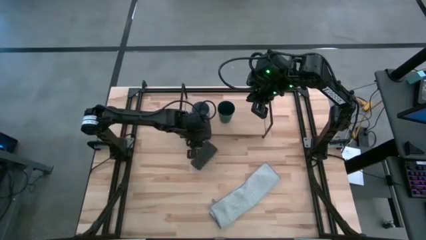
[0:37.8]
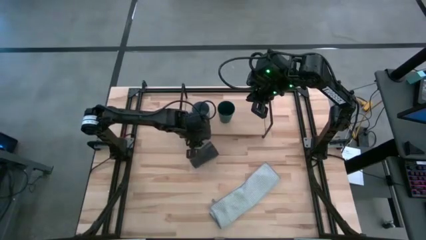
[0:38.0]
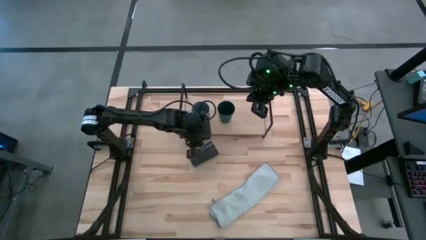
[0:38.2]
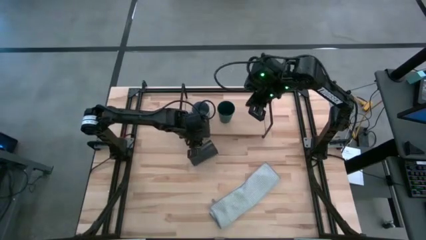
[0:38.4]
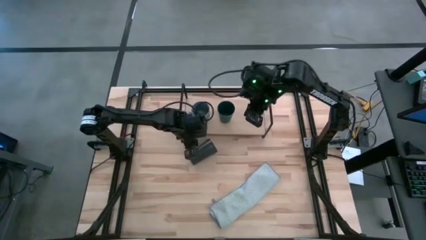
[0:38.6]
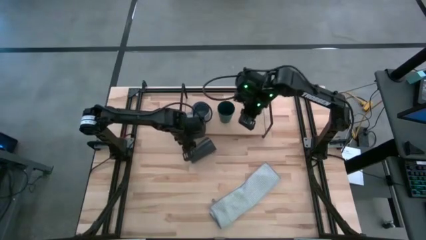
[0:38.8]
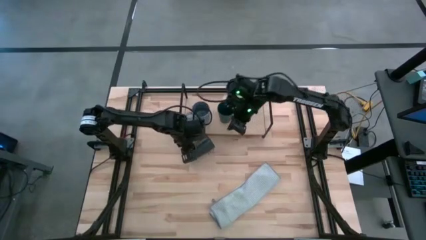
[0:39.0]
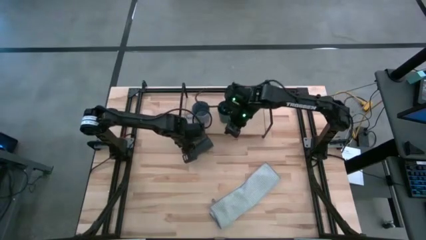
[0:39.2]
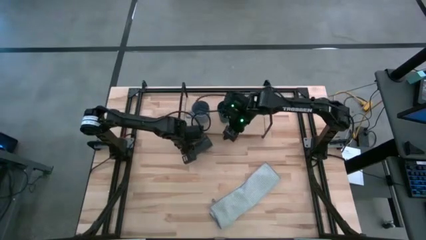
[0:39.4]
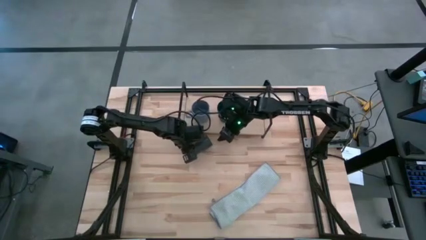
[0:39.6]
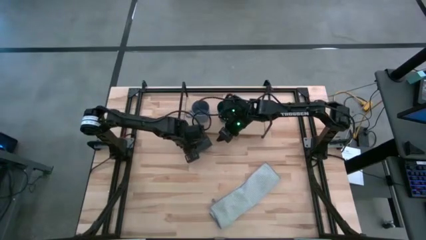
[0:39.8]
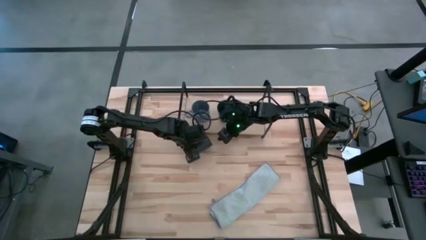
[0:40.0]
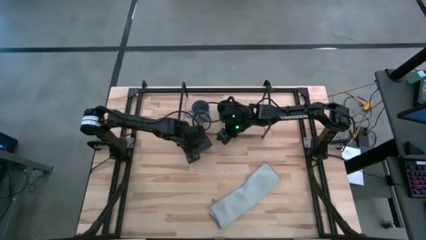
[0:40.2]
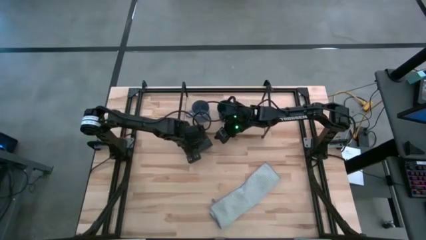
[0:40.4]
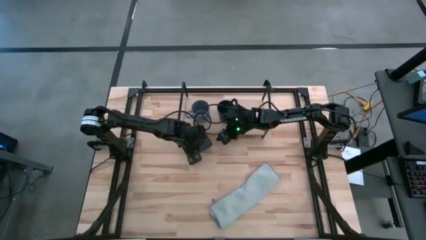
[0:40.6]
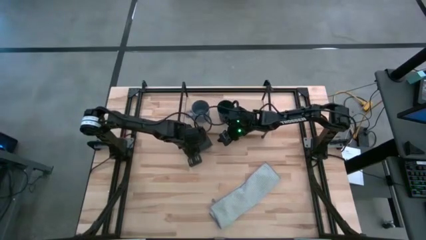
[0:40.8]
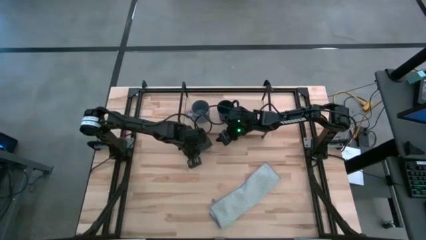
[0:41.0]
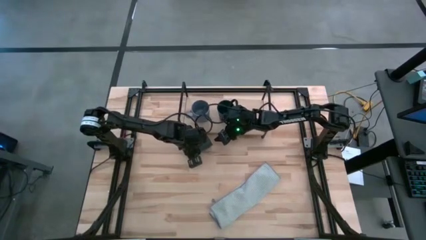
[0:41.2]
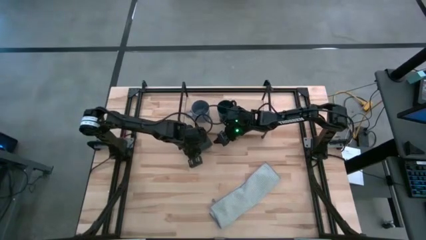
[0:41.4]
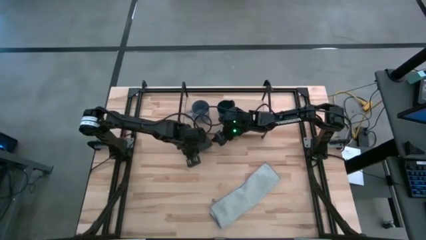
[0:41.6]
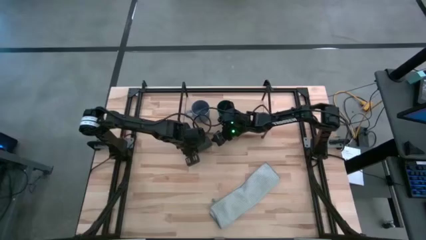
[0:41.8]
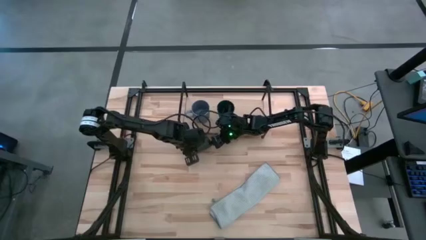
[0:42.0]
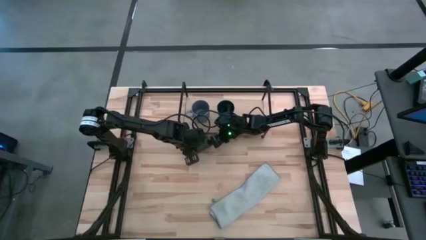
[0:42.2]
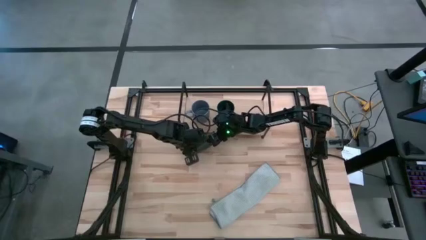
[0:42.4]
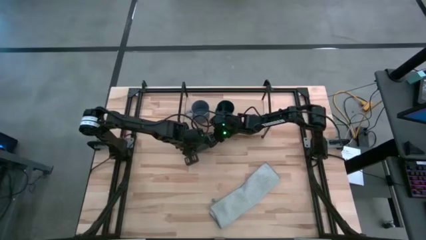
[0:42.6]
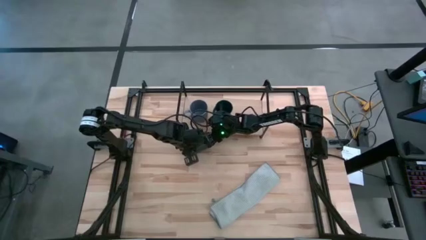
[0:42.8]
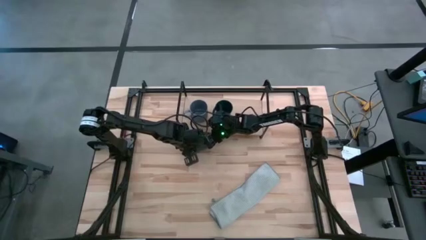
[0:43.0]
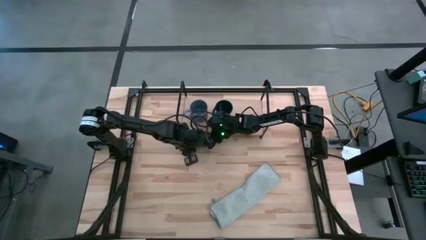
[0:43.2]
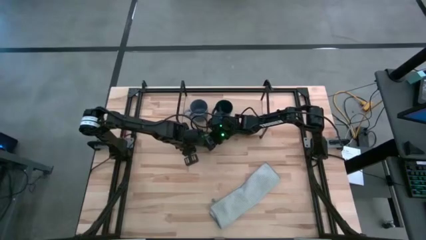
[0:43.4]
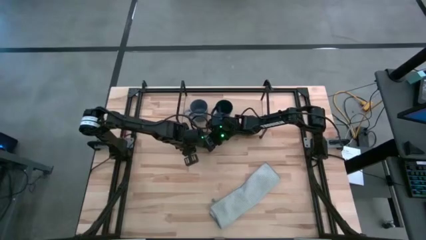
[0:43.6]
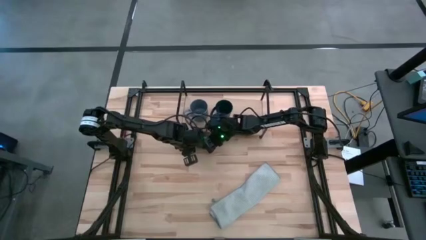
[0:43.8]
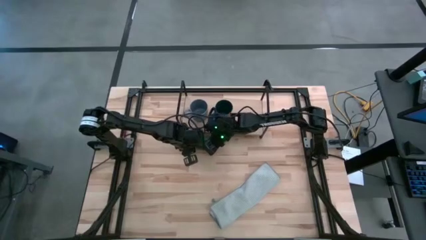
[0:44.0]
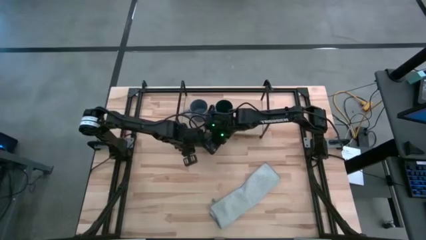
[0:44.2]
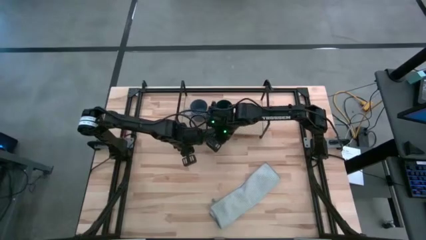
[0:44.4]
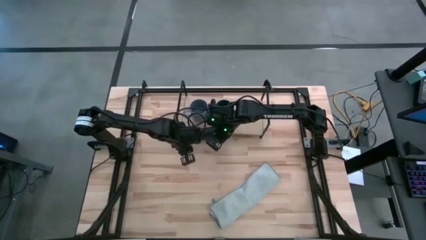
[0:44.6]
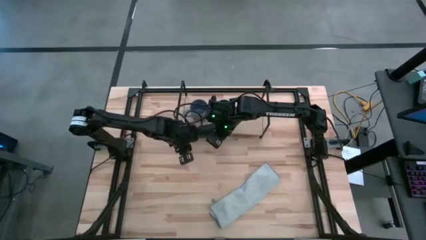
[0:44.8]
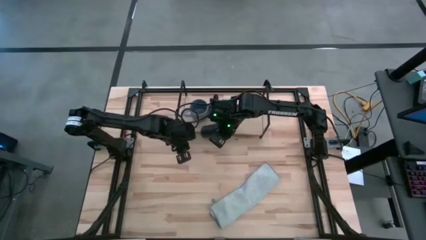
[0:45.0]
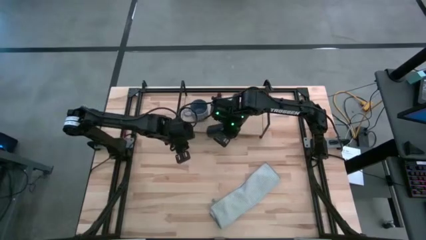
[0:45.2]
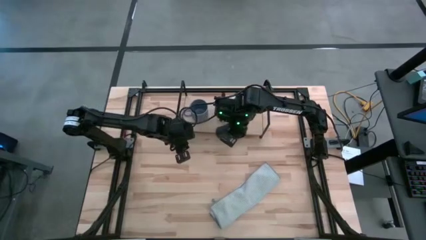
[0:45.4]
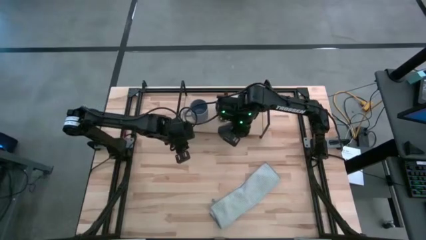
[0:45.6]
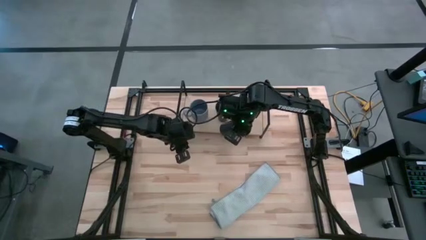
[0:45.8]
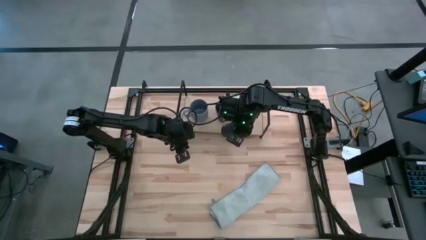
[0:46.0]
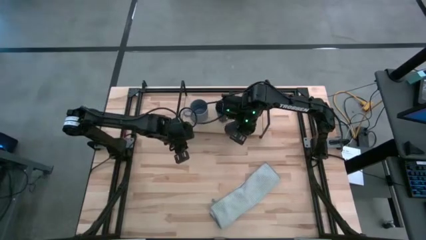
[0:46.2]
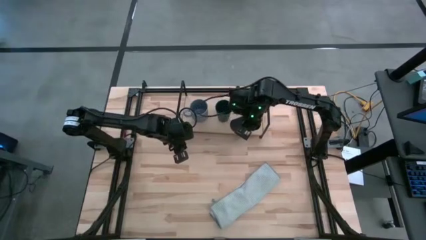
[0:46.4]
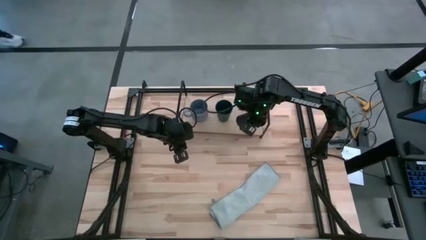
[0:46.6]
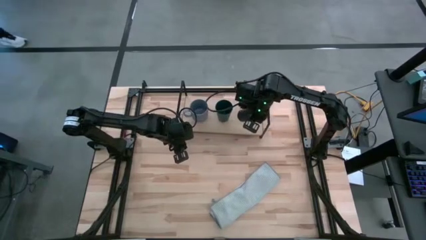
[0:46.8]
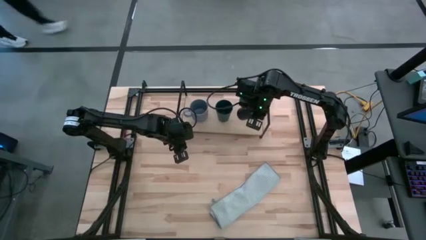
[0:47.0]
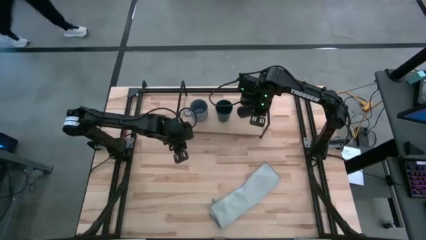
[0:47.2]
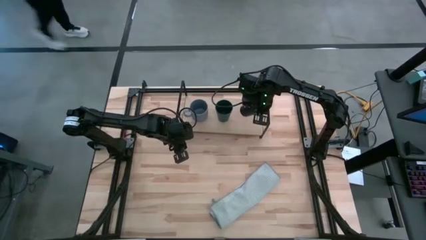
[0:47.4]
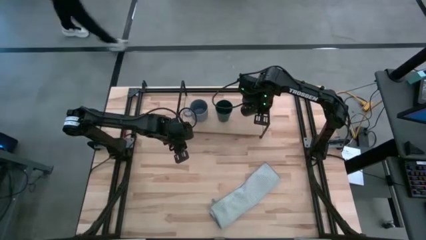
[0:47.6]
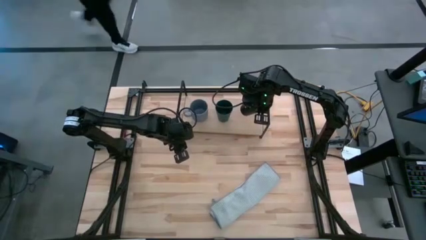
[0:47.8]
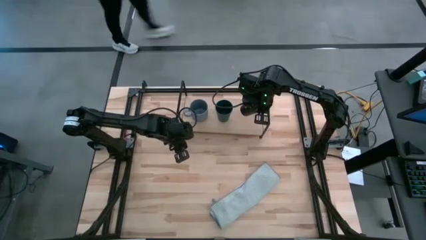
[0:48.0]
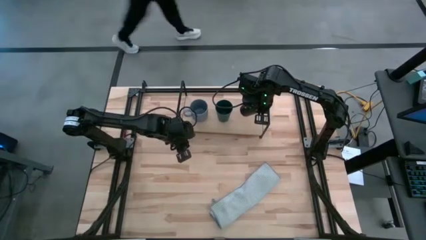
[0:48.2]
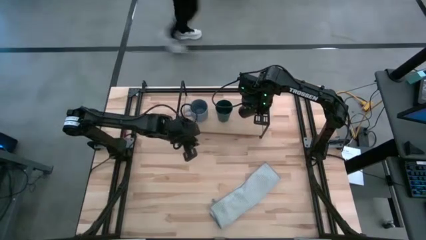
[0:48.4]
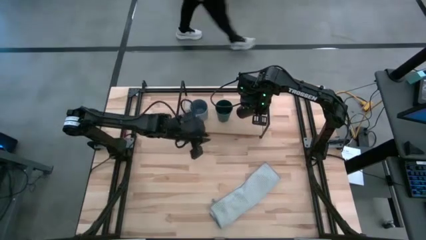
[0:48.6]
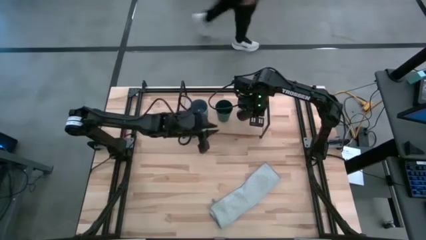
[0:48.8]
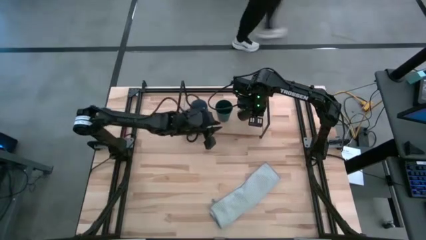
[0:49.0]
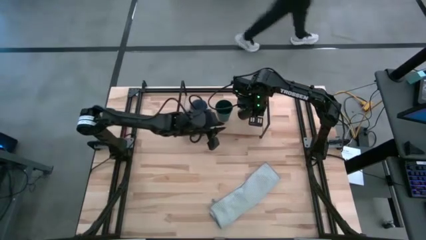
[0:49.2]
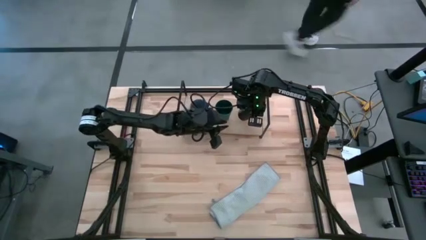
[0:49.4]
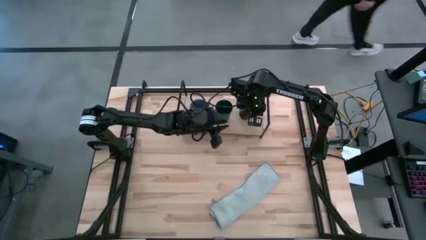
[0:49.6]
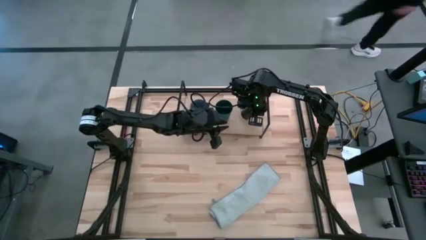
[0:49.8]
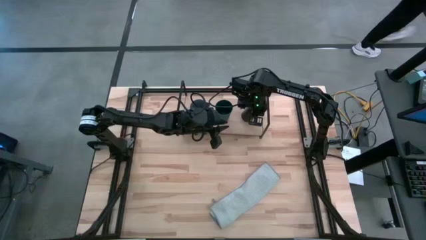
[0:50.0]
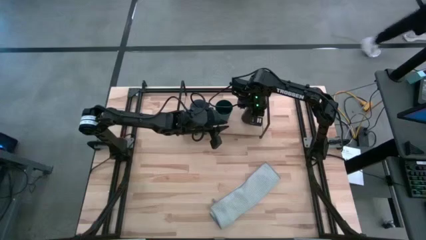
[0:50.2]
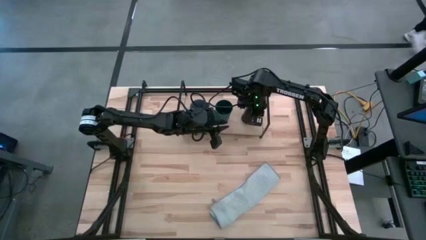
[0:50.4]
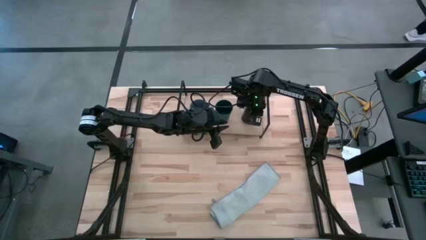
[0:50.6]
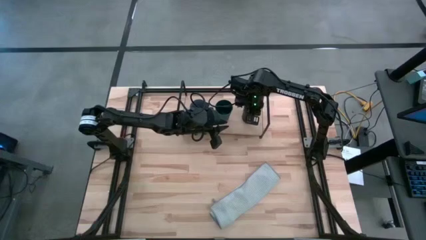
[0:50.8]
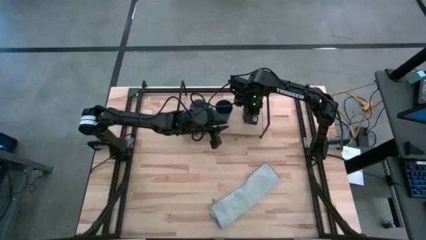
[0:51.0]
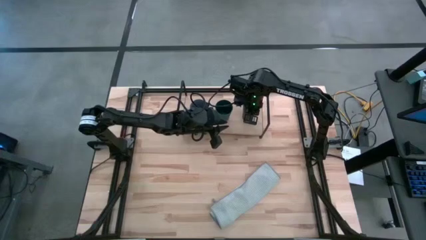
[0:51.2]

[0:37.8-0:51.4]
Task: Stack small to large cups/mugs on shelf
Put the black cup on the shelf

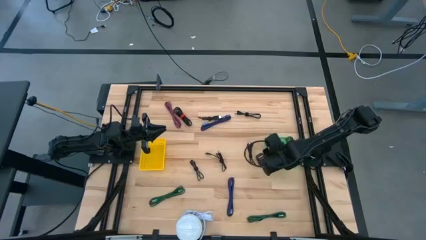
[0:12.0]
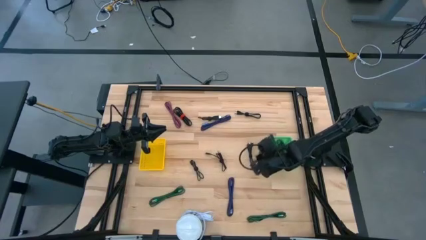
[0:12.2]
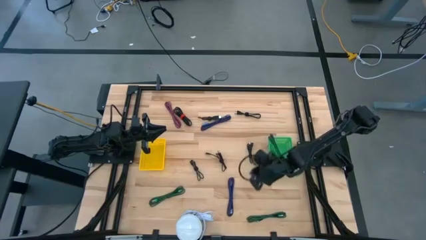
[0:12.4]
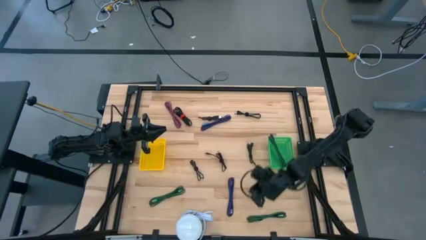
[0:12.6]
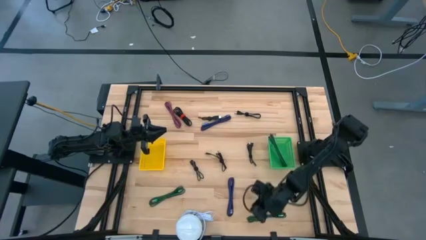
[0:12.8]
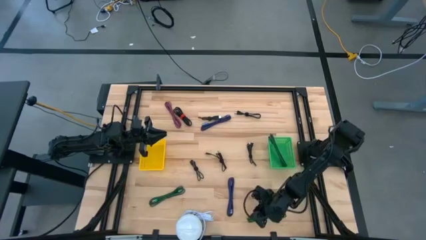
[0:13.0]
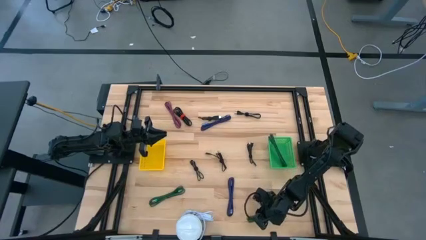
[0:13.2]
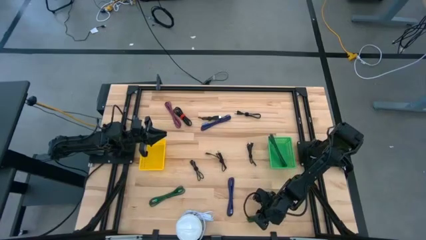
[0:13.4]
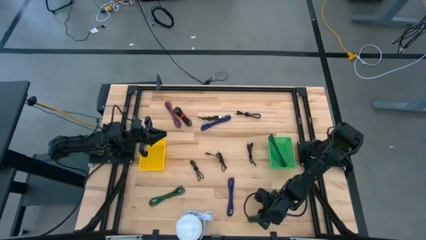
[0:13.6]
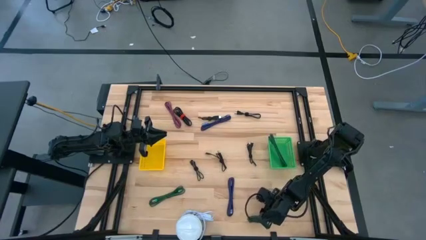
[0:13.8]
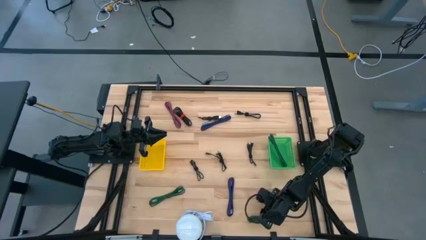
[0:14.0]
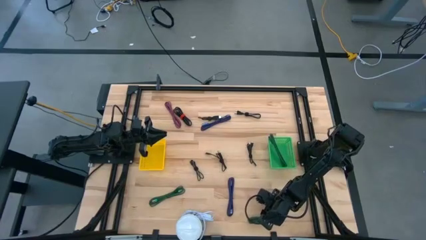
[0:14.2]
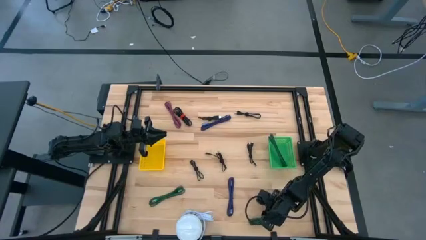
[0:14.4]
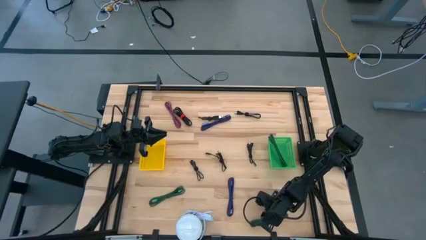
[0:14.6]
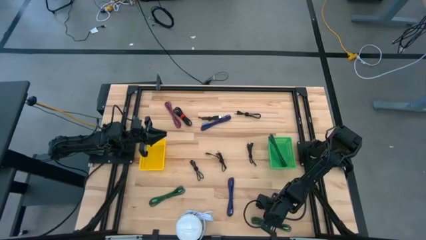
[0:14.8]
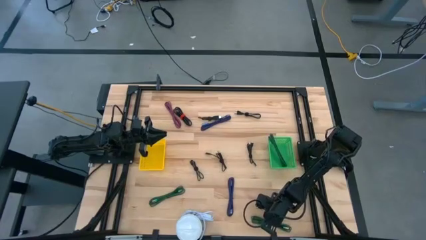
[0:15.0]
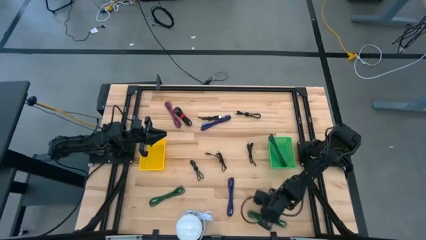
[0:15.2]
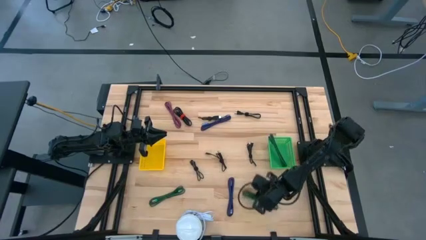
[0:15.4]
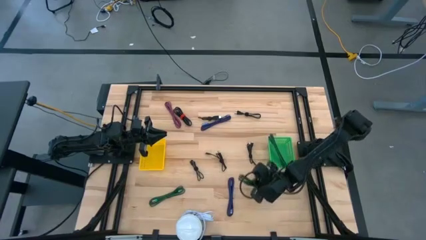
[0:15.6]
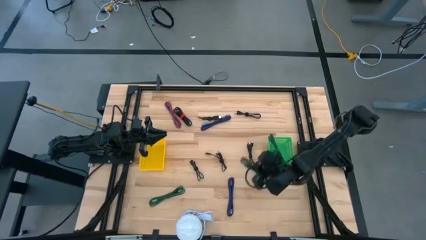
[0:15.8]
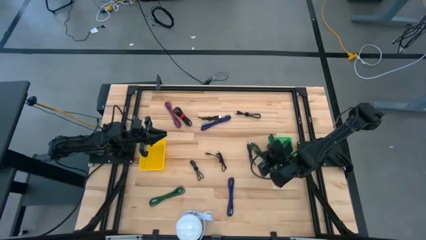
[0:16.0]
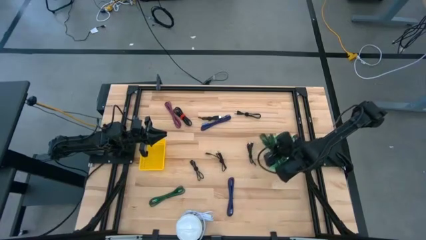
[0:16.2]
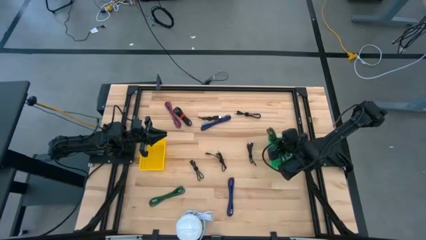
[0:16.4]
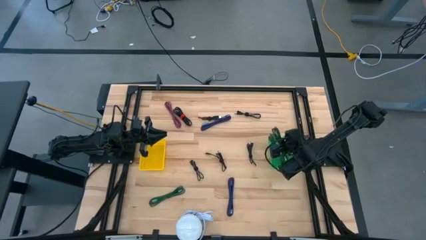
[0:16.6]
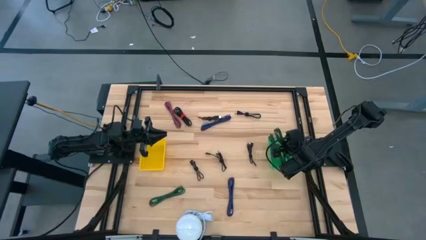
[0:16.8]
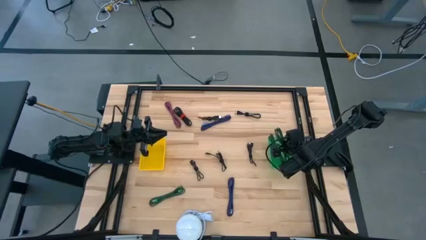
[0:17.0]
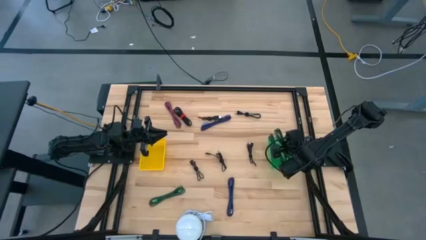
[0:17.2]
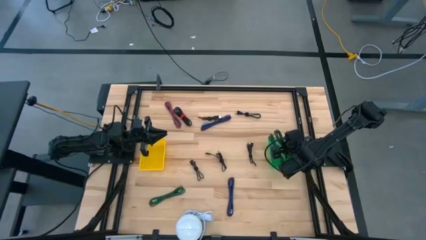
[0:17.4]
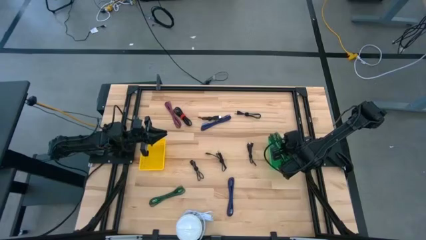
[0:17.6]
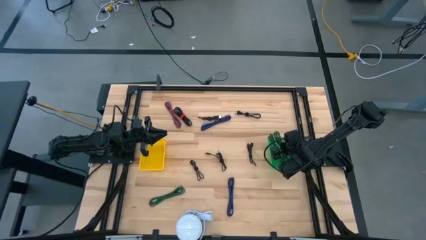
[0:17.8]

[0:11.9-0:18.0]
Task: Pick & Place USB Port
Put the black and green charger cable into the green basket
